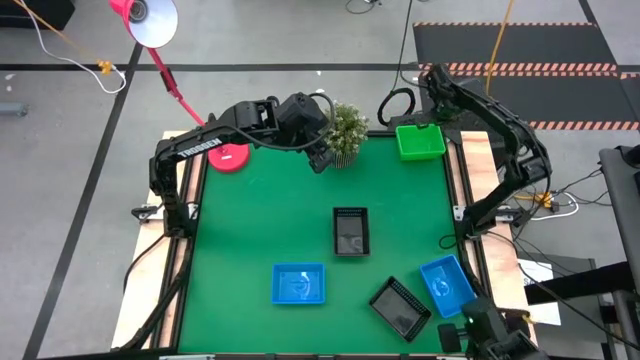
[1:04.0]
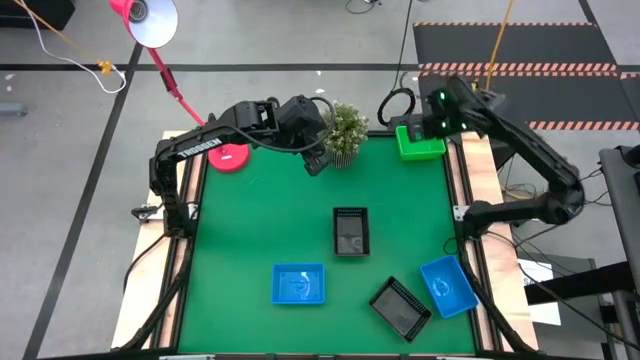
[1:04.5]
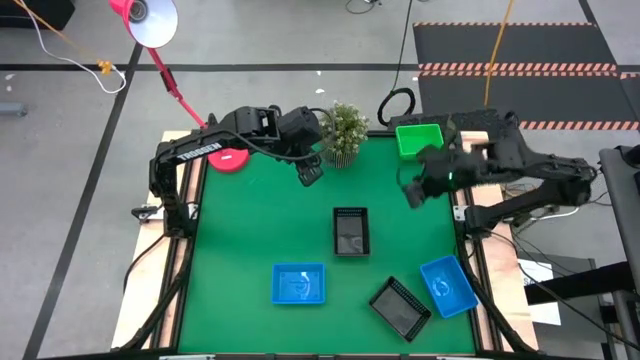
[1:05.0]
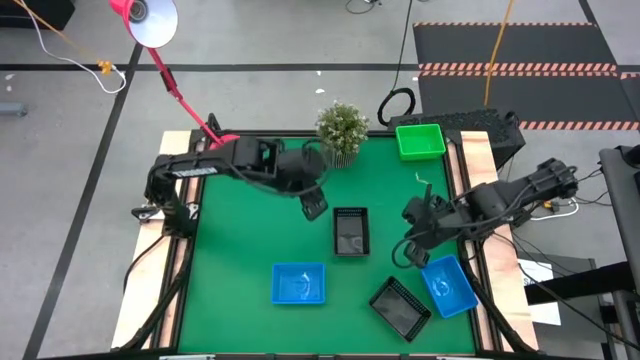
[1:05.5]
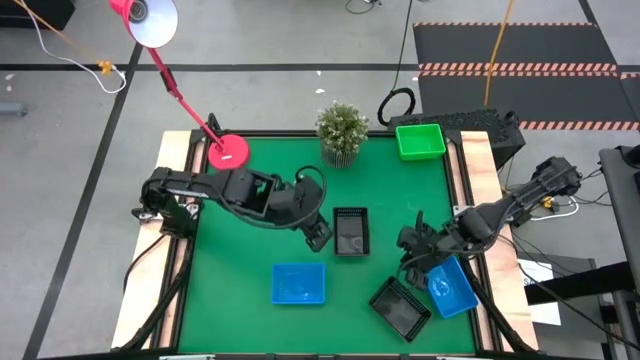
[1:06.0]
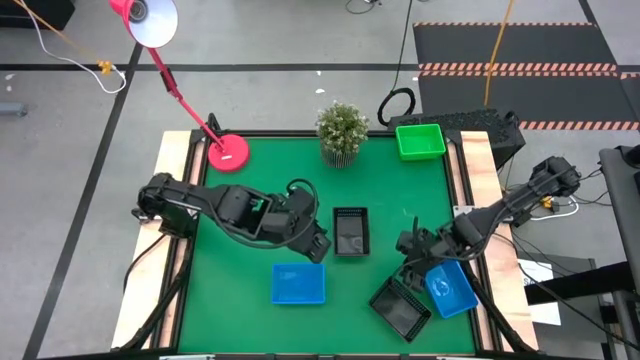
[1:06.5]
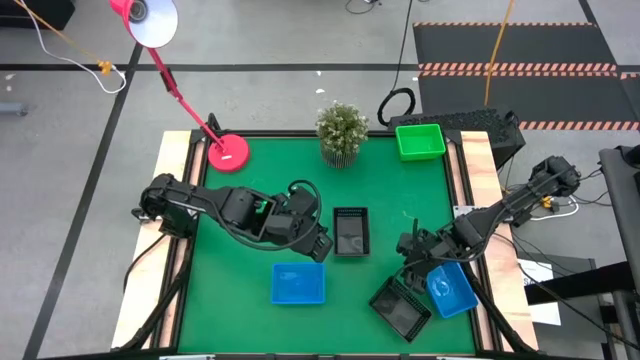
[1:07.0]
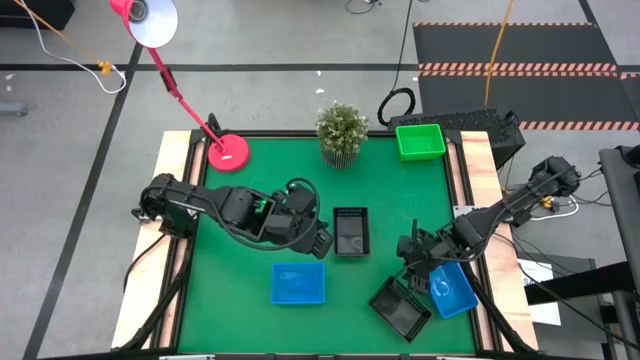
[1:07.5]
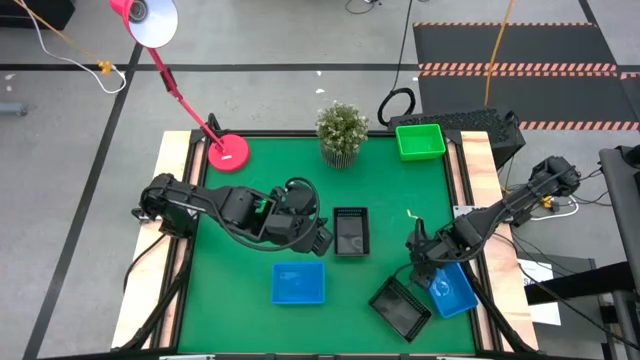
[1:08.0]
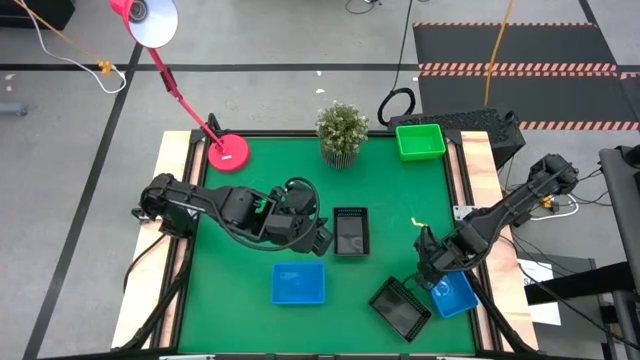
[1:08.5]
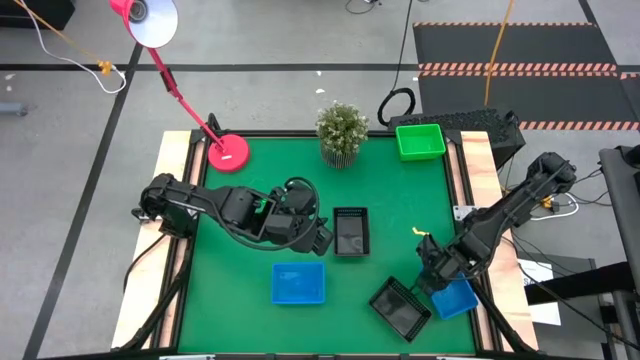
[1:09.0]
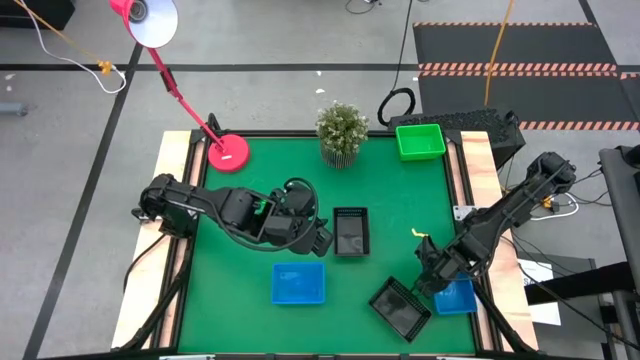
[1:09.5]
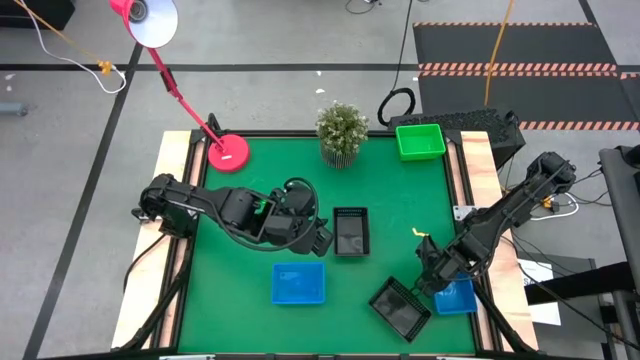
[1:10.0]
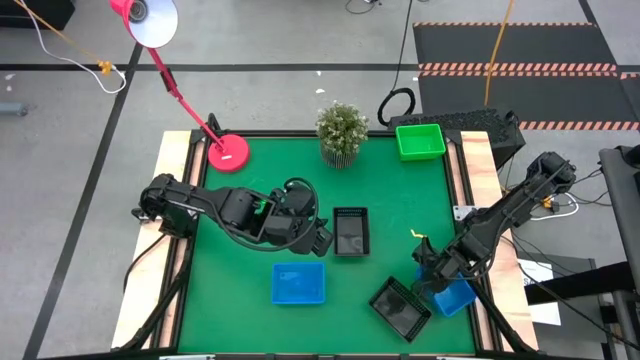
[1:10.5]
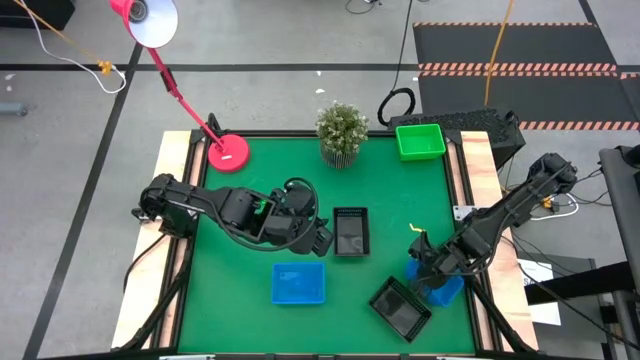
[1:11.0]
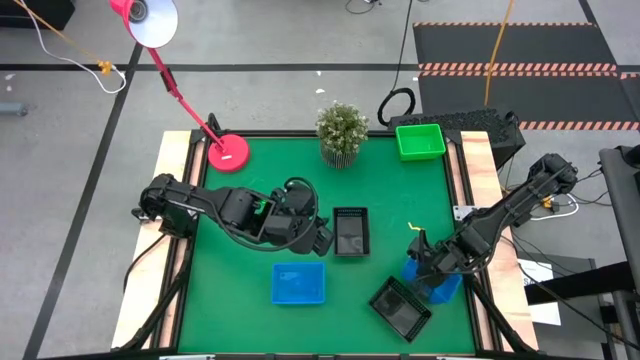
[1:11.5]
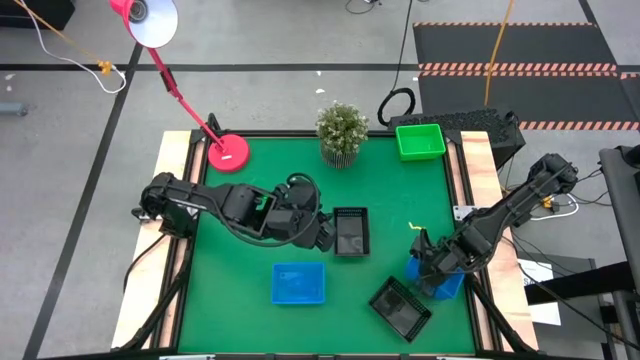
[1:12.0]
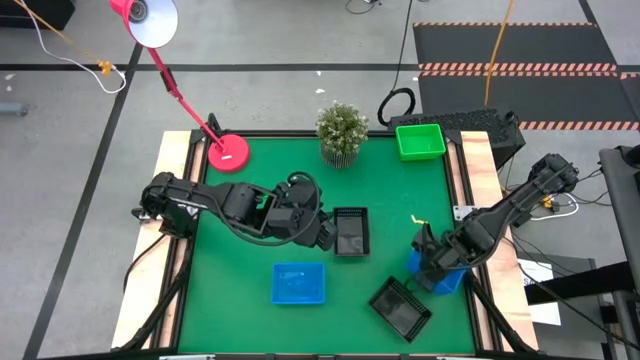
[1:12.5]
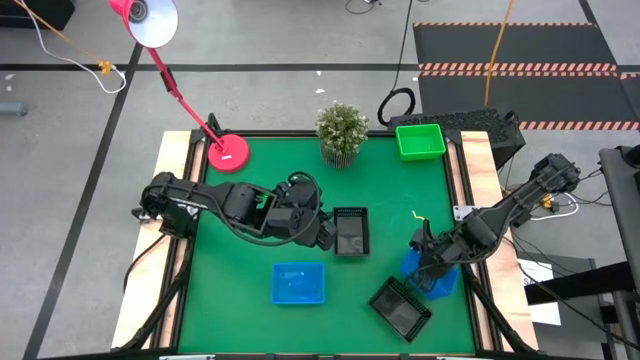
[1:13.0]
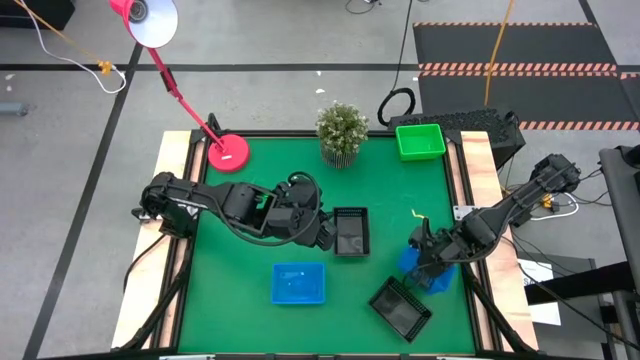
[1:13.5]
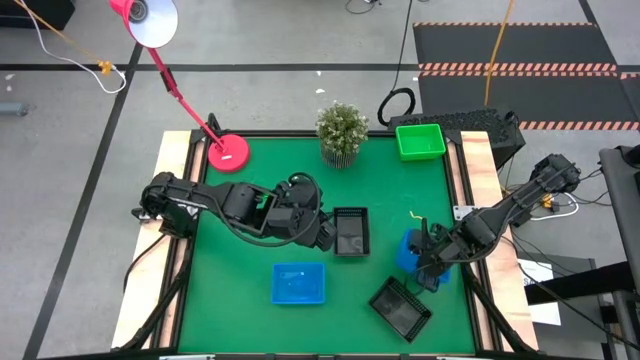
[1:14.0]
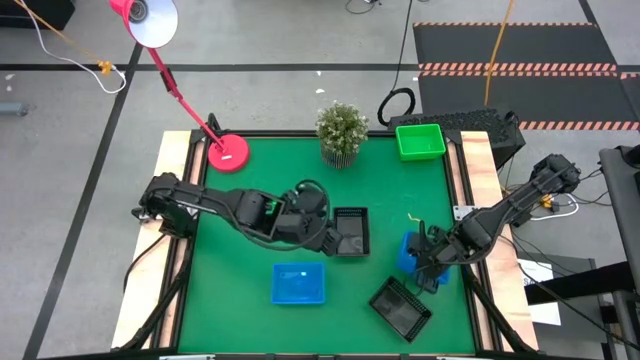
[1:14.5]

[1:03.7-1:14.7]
Stack the right blue bin on the left blue bin

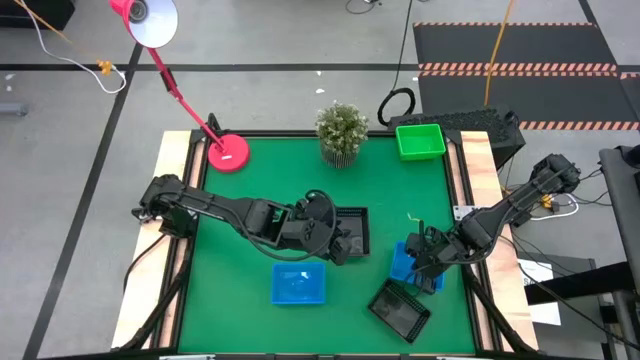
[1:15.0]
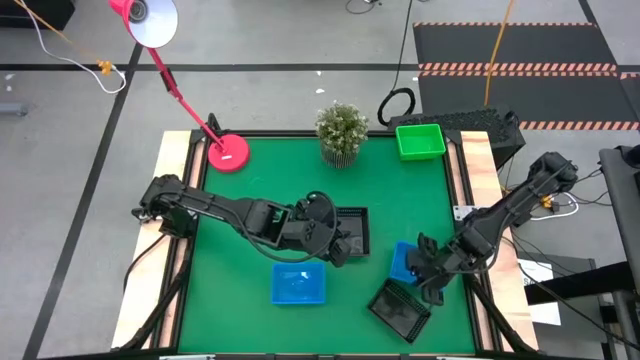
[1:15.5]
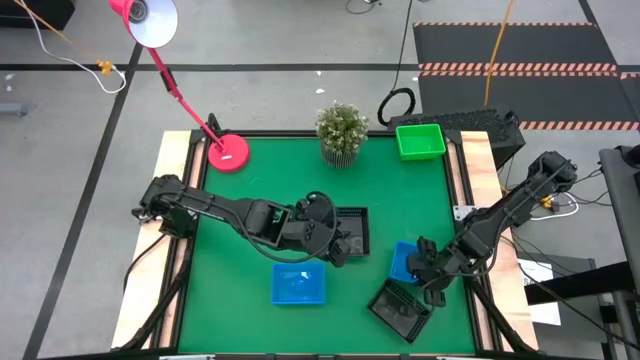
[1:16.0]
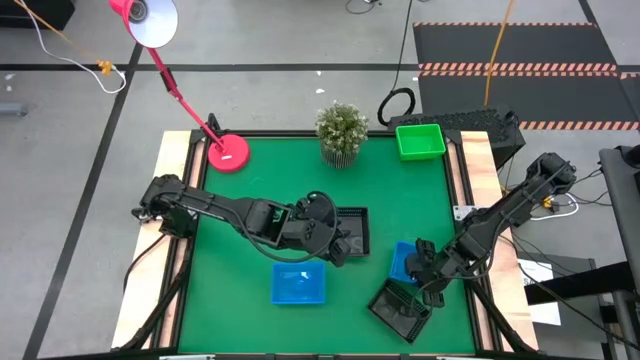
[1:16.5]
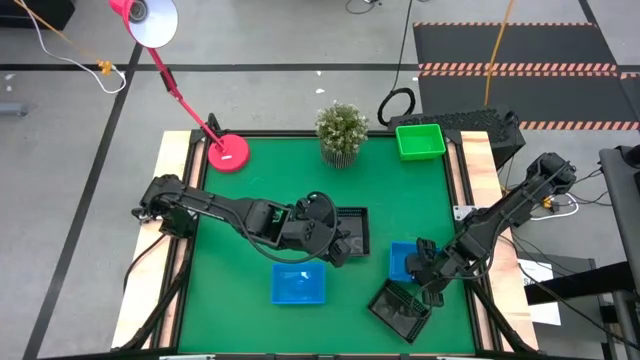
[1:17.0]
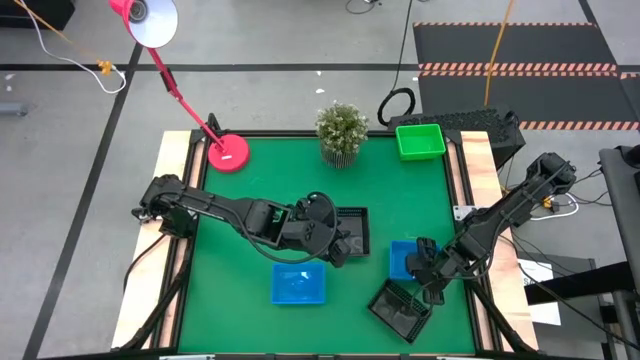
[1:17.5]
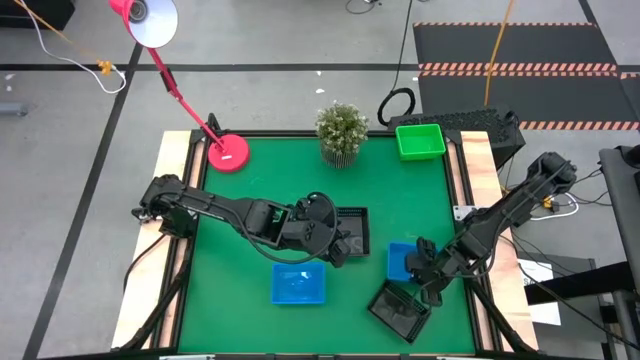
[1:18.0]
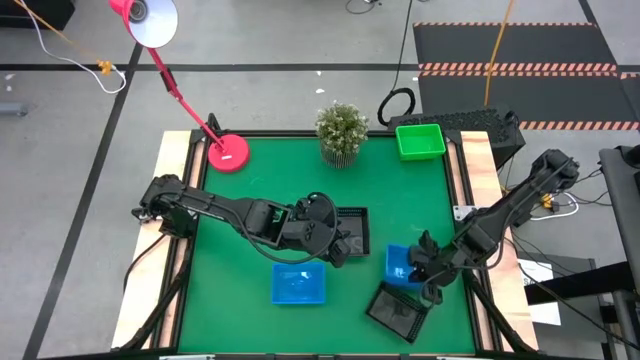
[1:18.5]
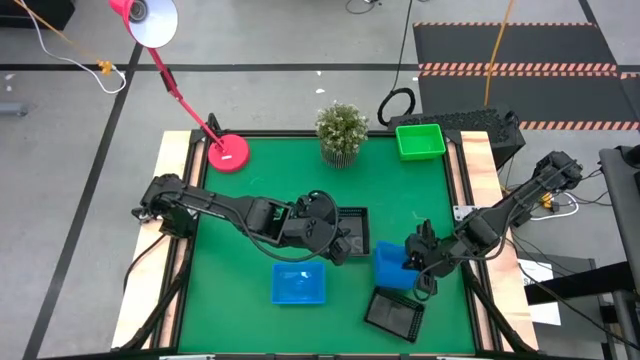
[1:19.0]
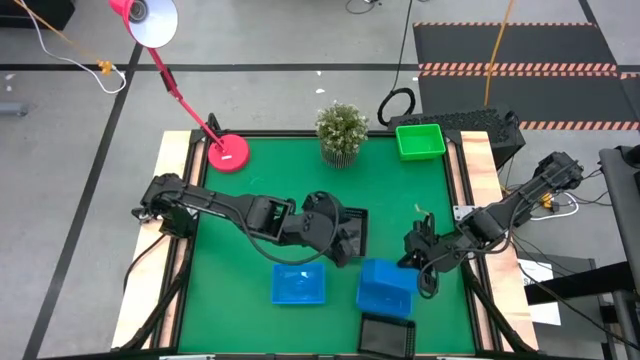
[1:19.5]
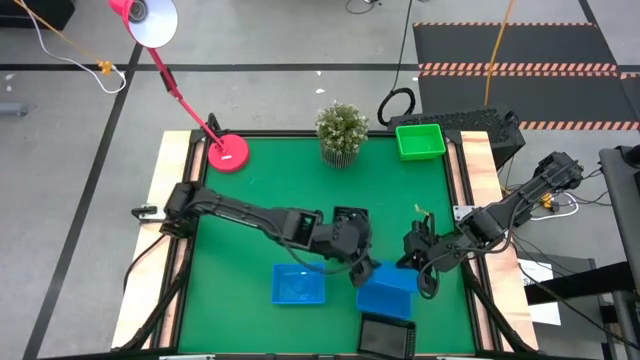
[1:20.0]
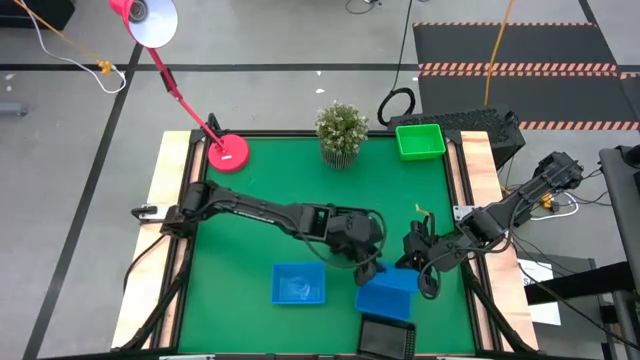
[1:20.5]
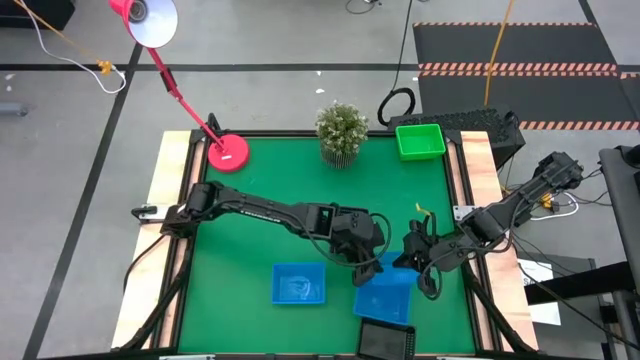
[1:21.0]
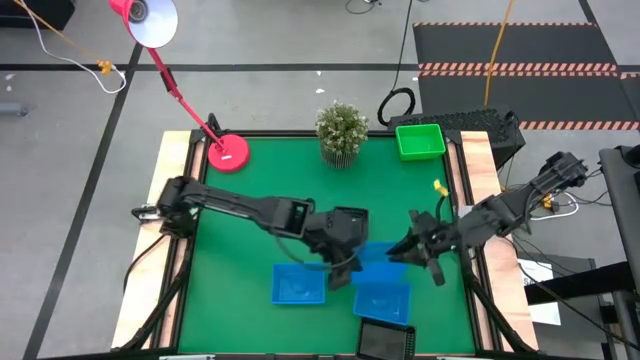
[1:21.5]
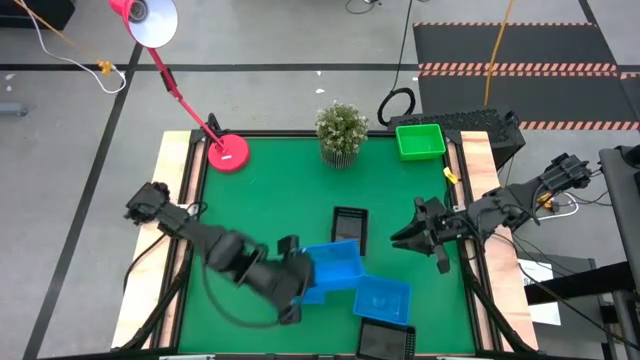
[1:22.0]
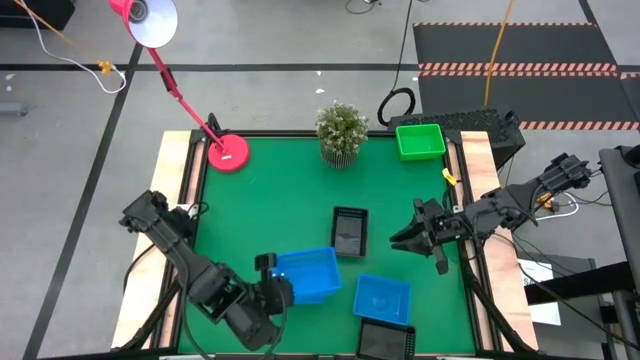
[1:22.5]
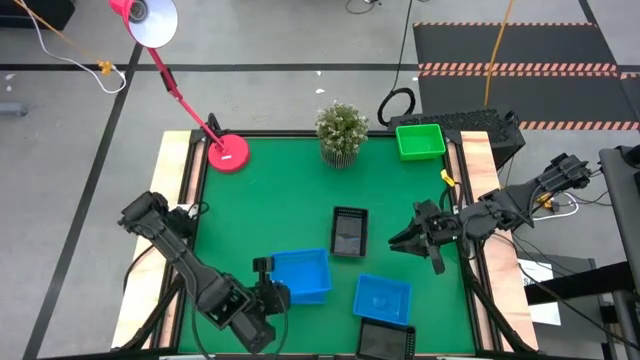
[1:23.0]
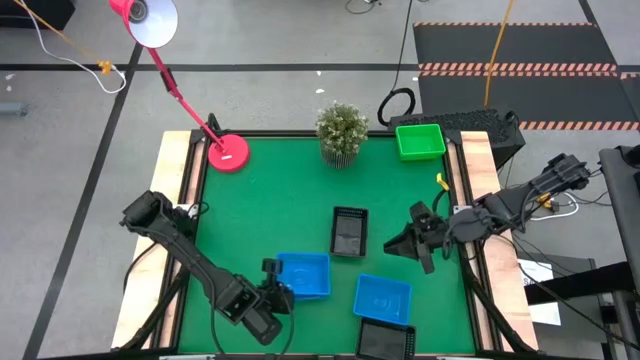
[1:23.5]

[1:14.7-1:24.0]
Stack the right blue bin on the left blue bin

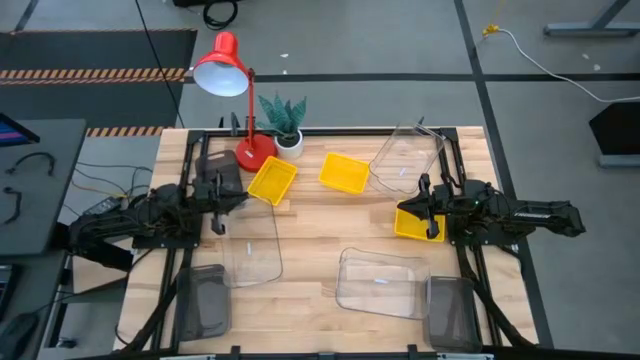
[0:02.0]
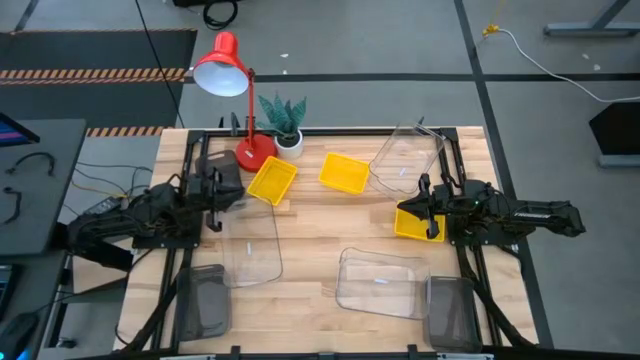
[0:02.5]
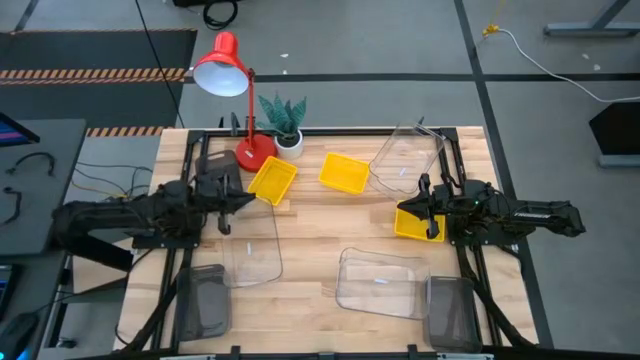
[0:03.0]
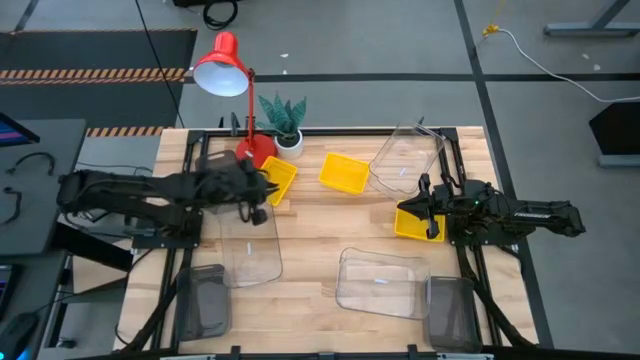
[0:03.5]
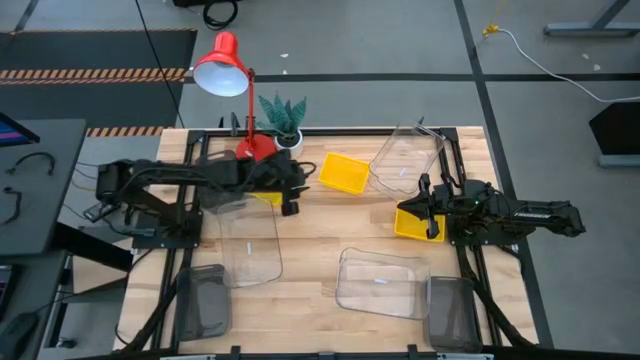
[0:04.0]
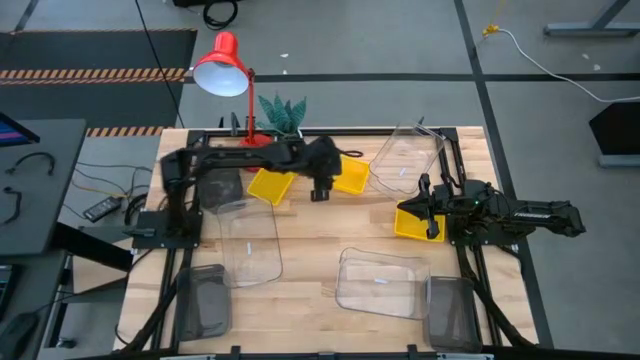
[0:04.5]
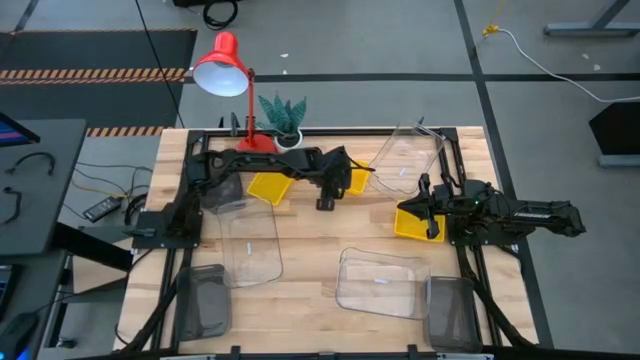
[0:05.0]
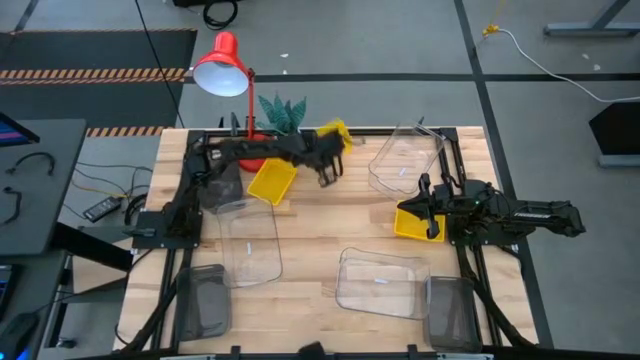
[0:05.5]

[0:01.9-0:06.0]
Adjust the middle yellow bin on the table
